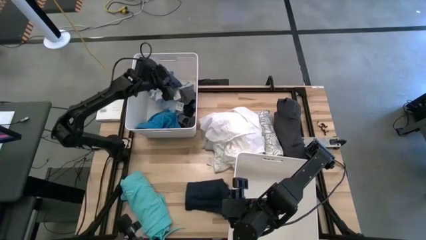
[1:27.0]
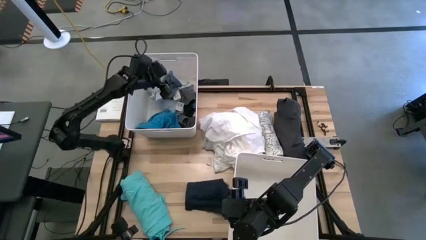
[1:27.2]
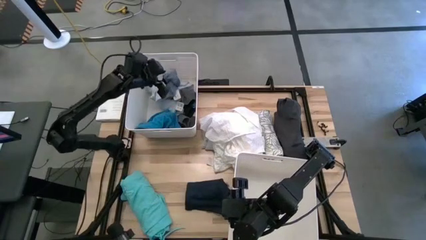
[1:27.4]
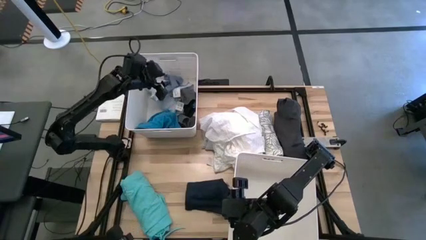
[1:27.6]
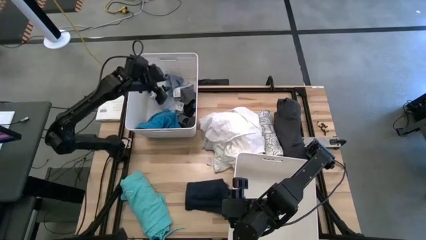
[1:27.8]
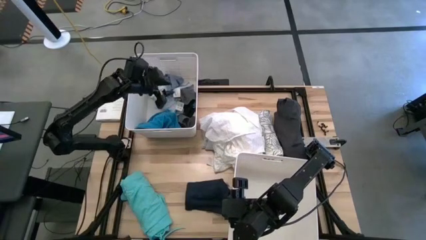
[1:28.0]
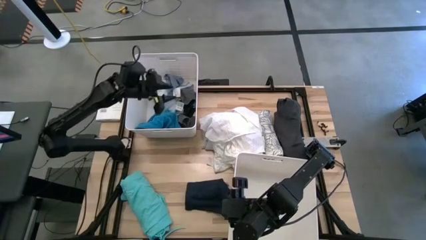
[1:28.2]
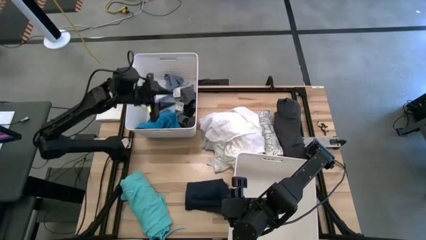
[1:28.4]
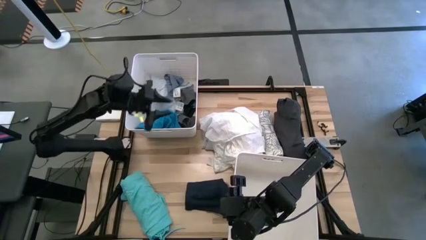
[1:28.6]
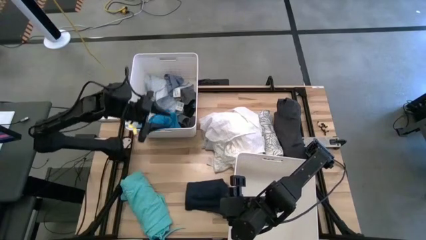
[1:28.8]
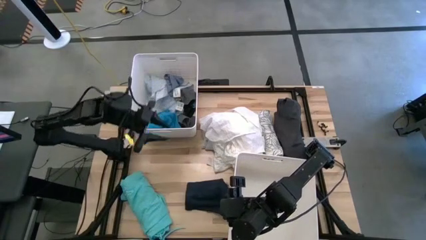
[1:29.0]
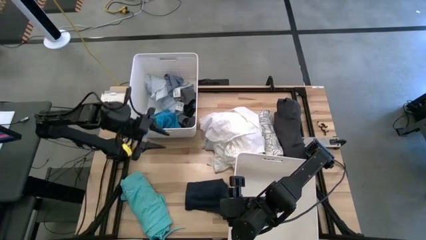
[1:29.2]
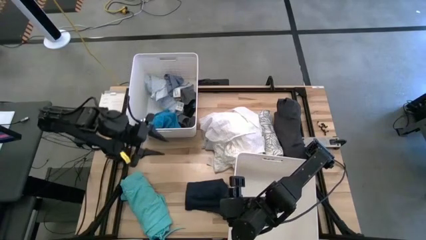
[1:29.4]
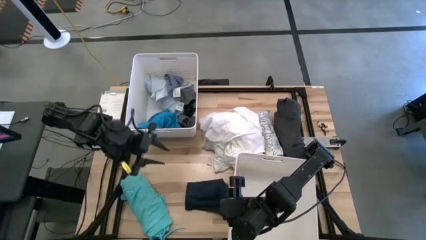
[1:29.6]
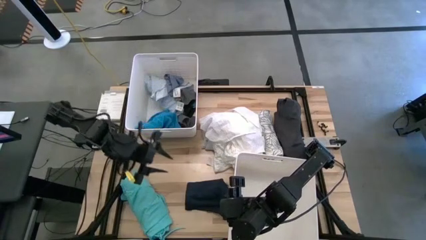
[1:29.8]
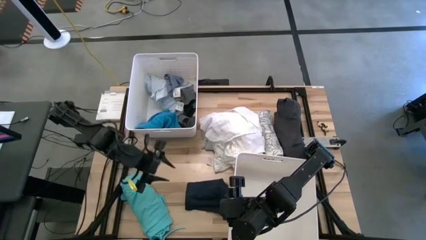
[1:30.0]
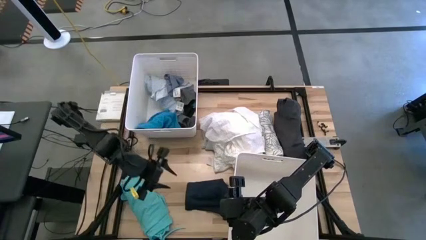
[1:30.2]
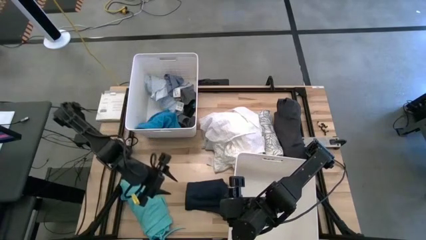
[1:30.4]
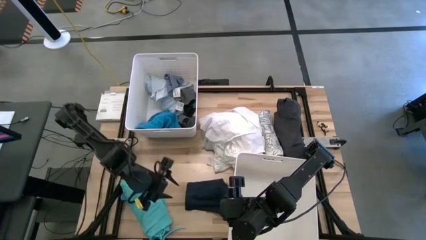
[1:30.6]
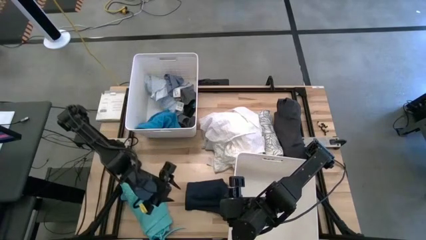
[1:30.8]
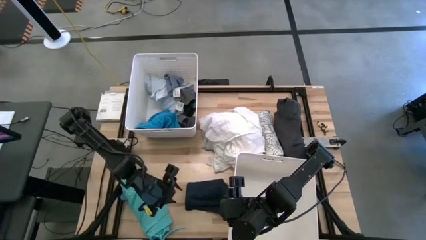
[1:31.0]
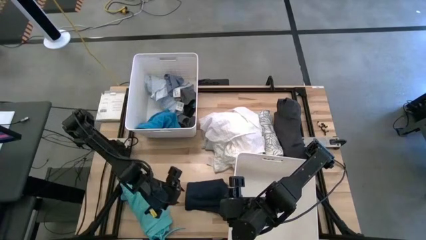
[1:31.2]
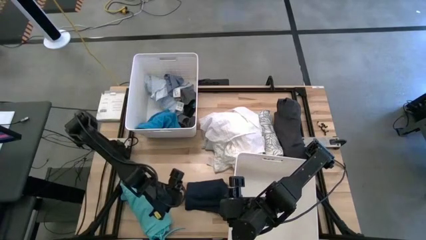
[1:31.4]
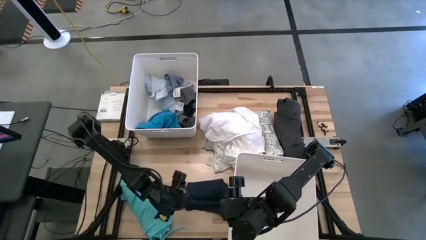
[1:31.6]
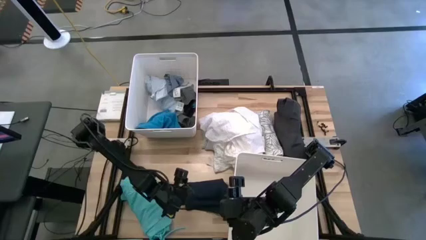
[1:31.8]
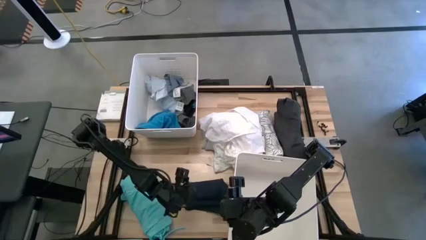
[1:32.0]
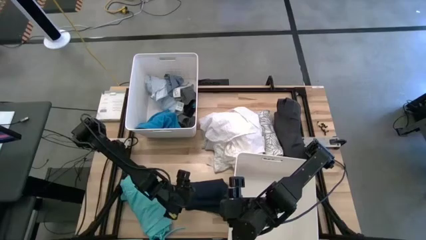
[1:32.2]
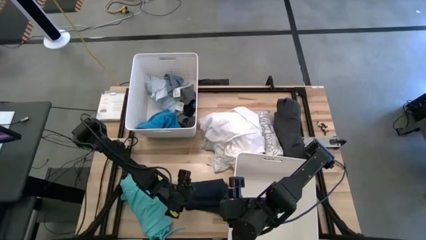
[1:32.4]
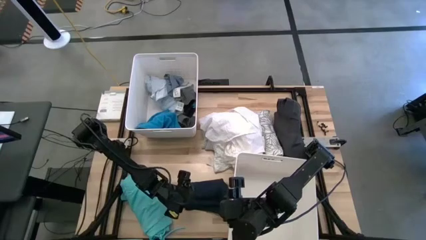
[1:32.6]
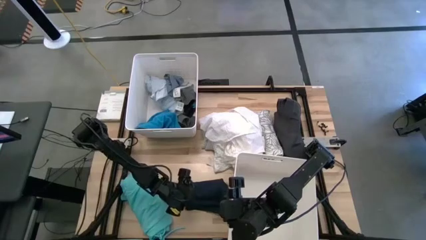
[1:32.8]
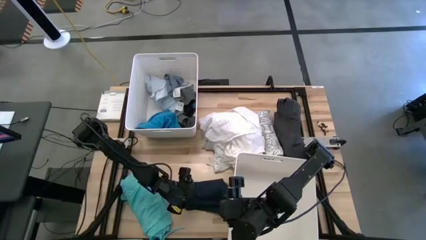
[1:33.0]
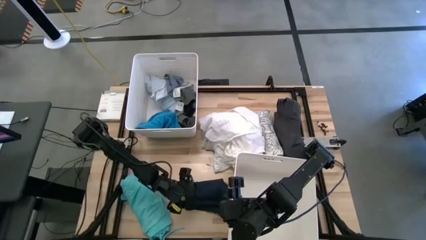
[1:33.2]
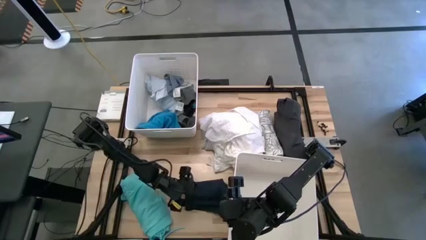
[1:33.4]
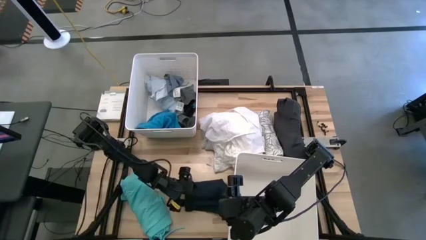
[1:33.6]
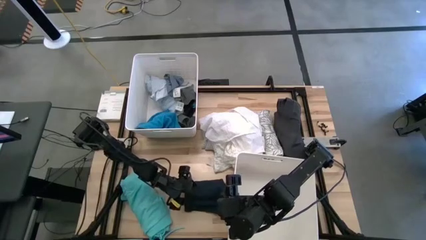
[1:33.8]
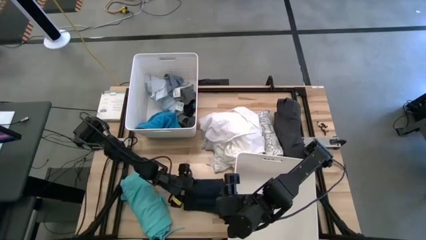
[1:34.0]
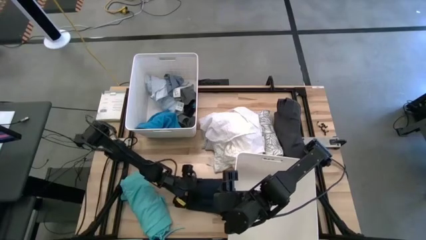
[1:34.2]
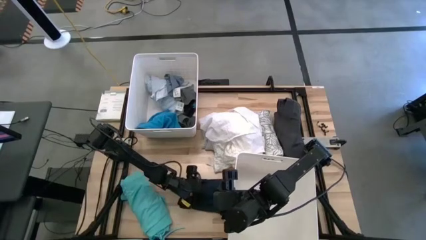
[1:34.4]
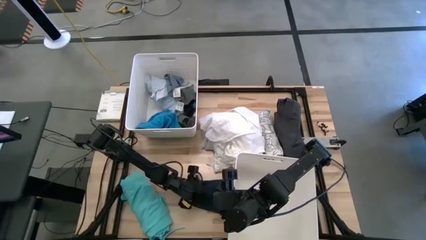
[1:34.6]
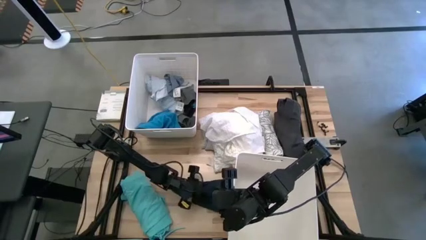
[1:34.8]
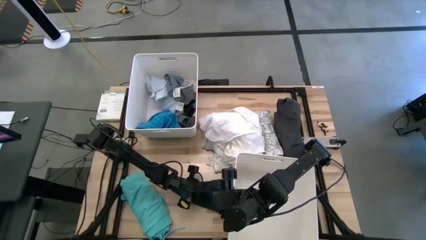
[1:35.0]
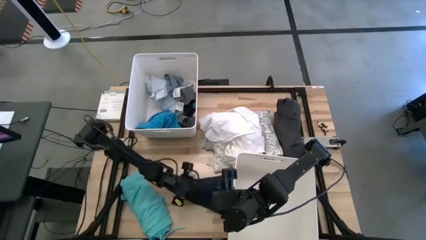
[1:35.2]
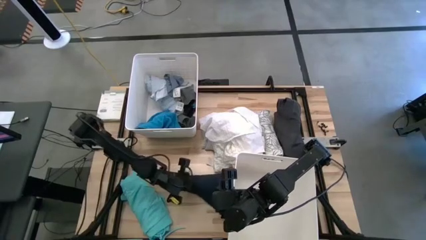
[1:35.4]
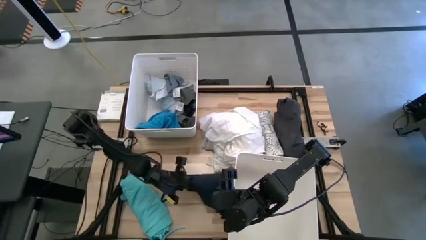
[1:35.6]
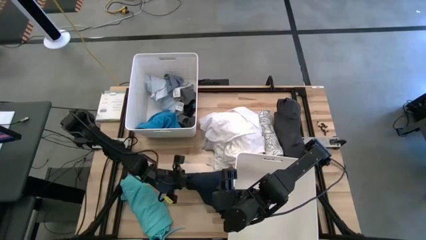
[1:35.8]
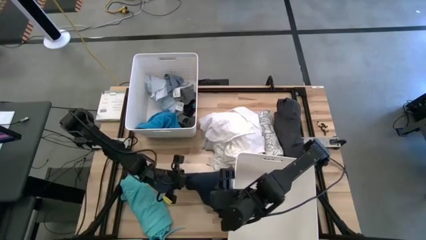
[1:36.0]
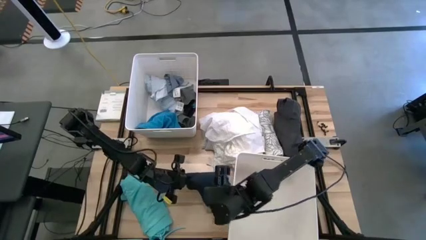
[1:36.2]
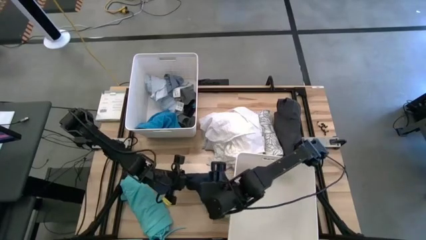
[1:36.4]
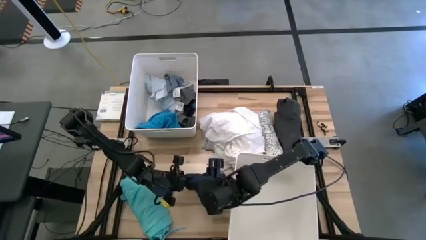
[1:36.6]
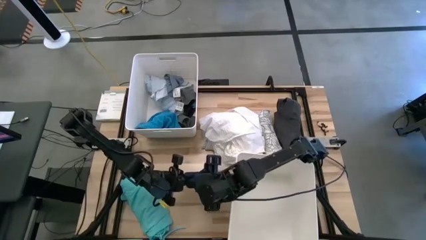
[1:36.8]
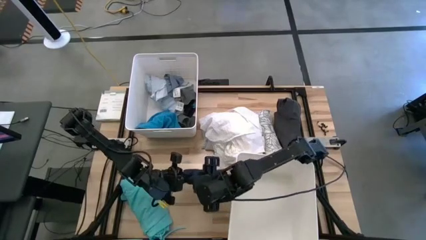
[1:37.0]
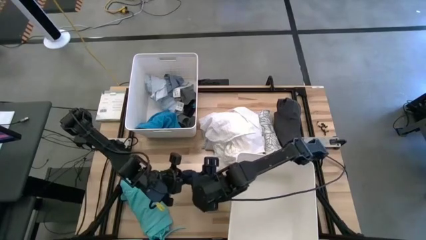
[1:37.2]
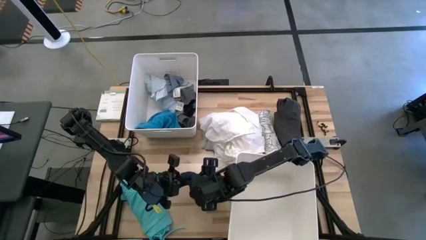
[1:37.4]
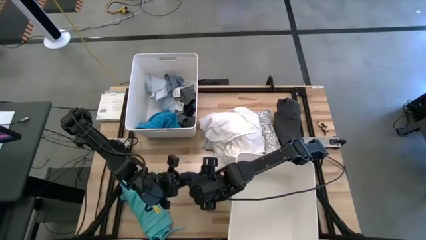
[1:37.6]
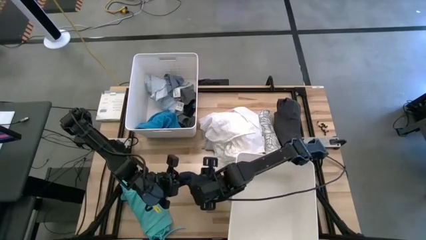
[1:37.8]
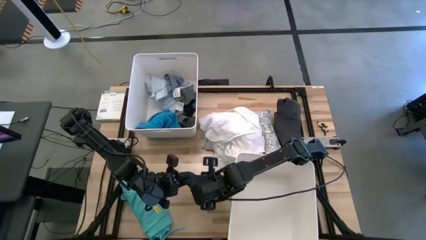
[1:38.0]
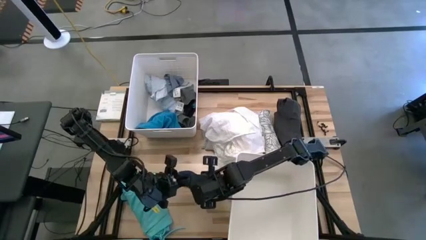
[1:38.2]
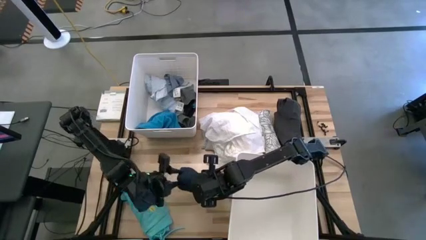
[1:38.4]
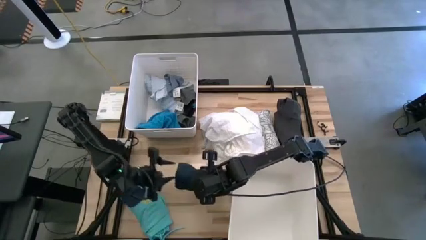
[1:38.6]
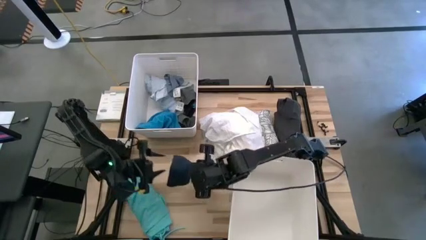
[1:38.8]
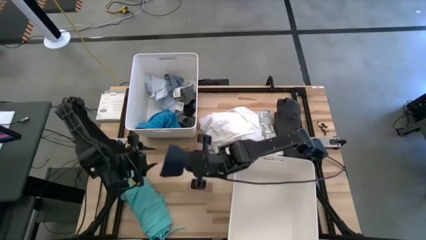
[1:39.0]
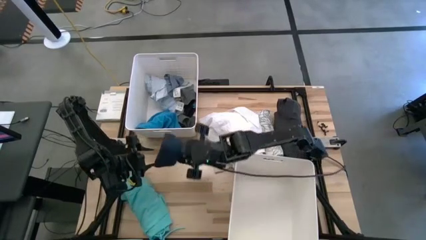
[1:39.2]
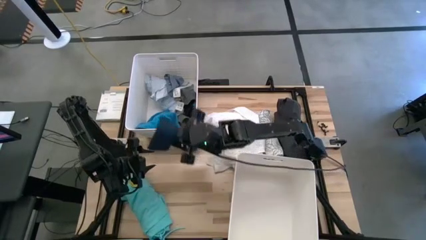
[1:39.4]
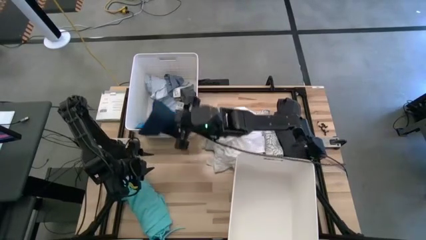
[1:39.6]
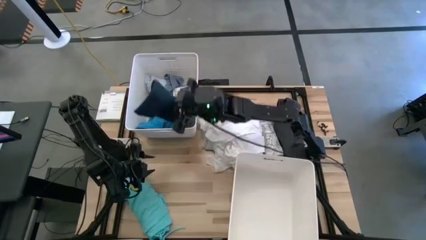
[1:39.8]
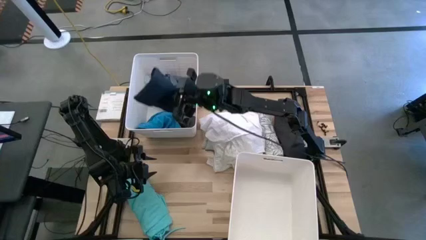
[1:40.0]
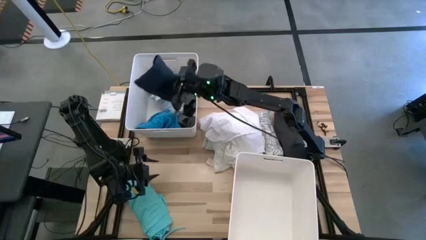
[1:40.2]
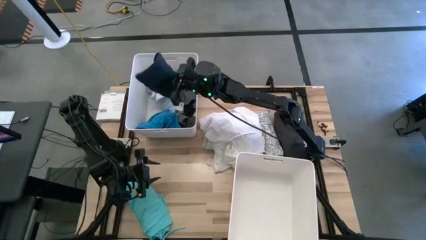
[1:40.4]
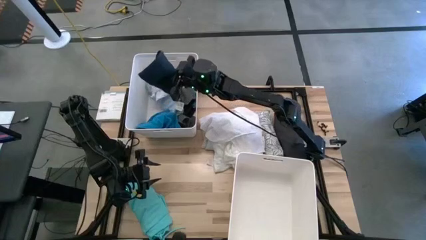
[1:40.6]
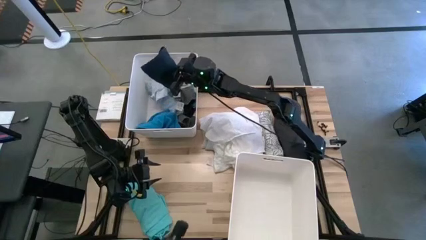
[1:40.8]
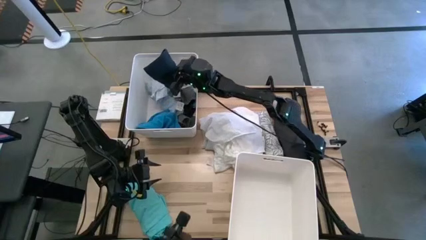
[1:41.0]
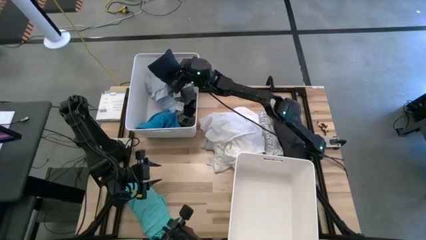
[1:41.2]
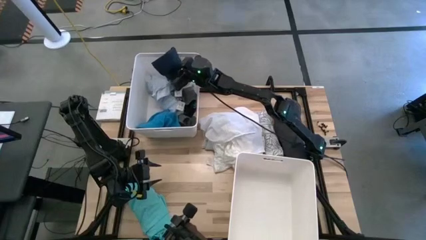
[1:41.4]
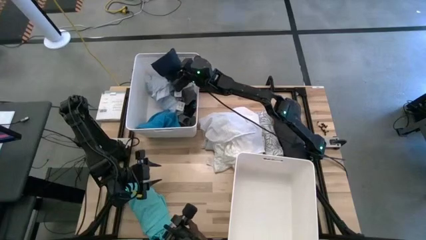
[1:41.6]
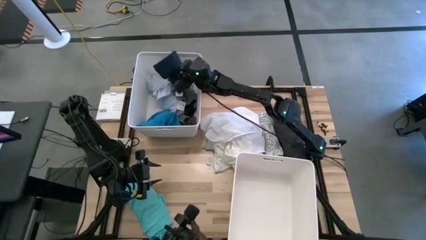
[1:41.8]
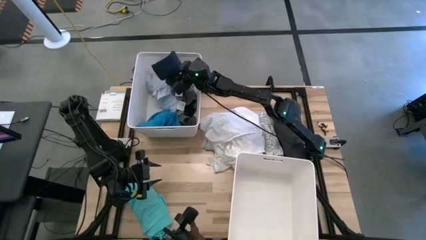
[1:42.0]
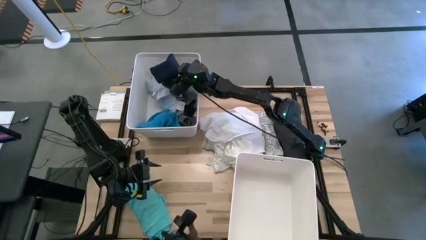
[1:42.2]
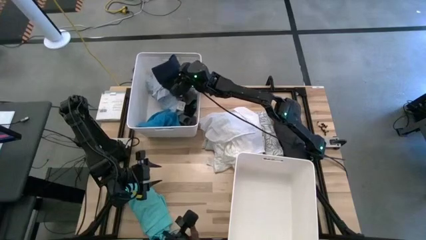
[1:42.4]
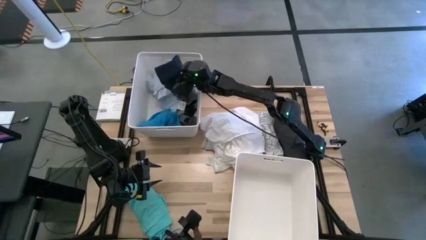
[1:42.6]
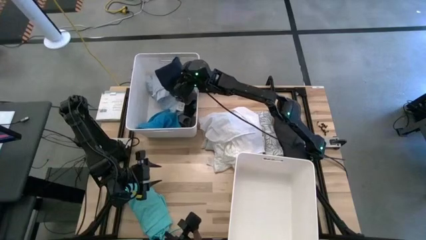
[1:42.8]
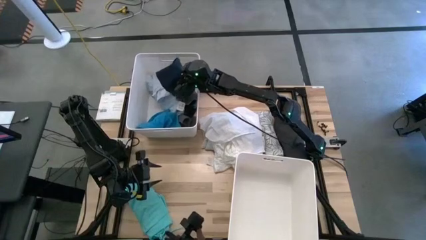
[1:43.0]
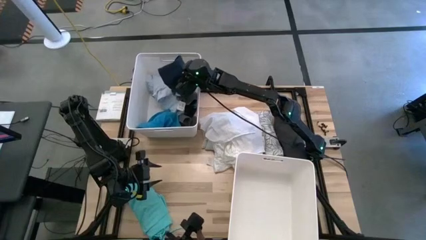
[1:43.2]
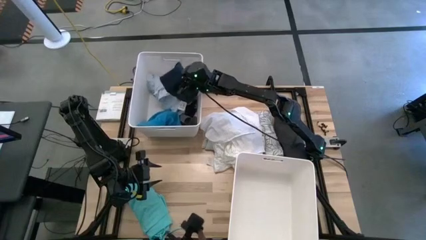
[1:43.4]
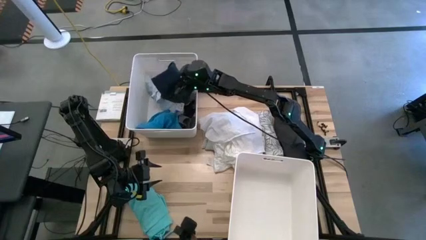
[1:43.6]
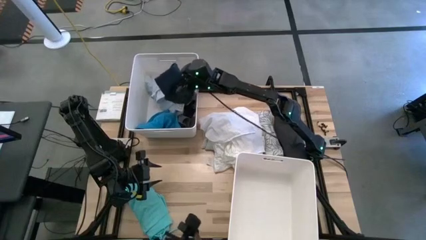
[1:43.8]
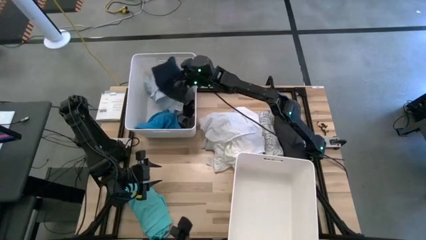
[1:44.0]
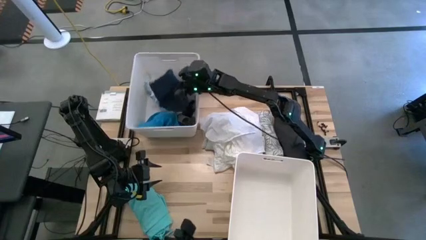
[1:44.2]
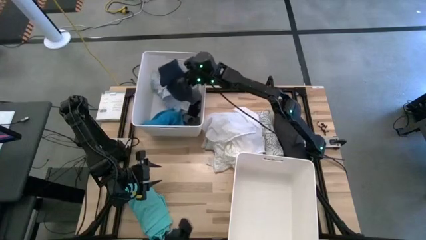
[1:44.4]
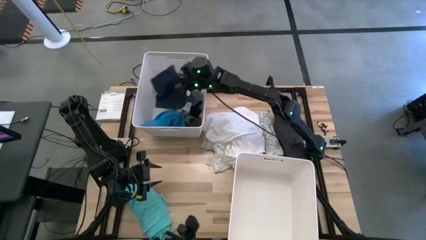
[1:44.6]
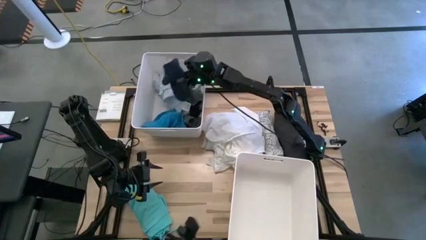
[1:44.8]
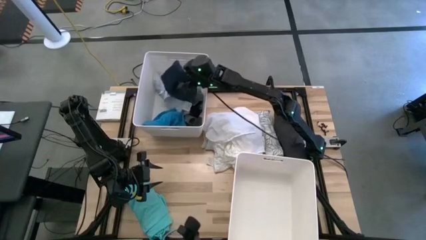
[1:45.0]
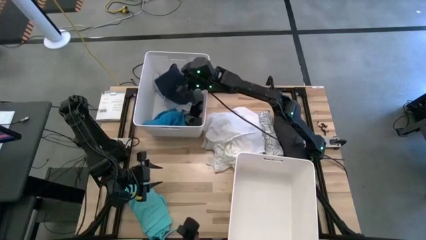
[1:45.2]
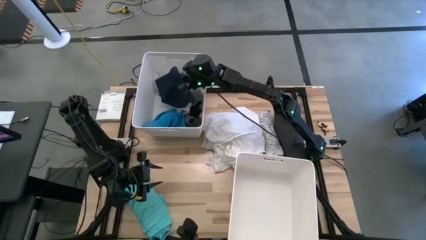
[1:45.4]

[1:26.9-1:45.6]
Task: Sort clothes
Put the dark blue shorts into the top white laundry bin
